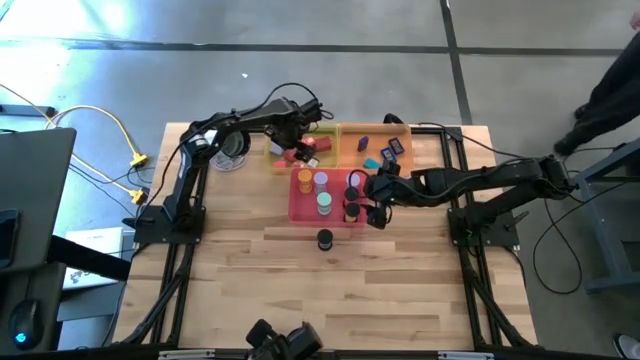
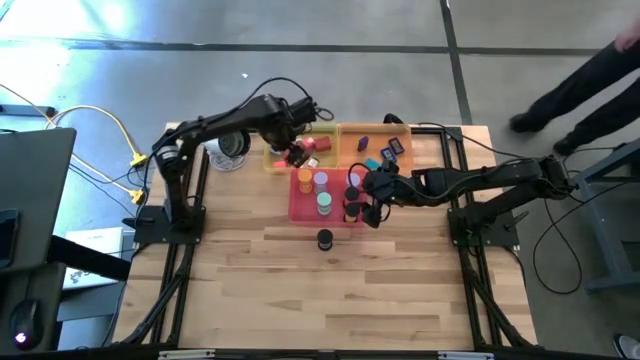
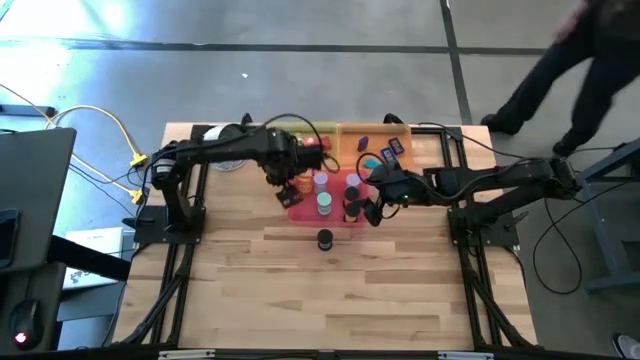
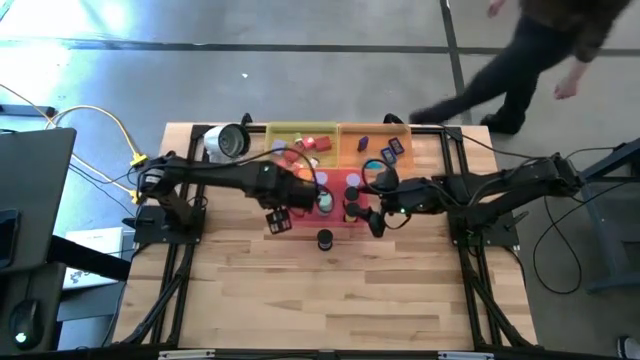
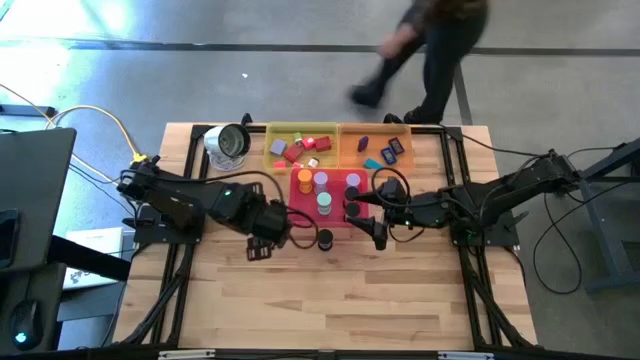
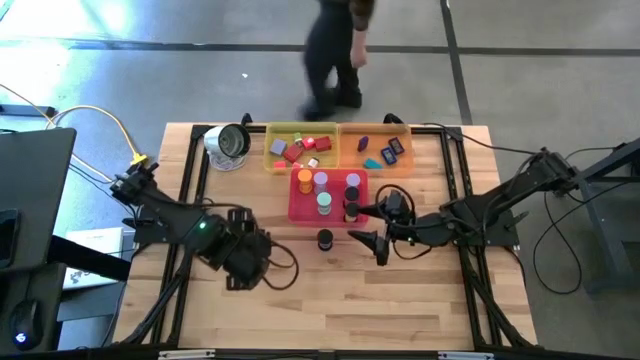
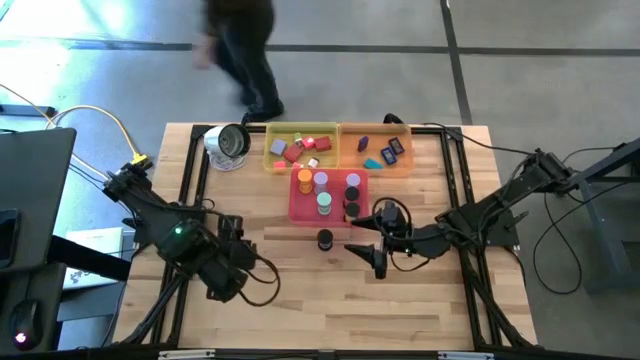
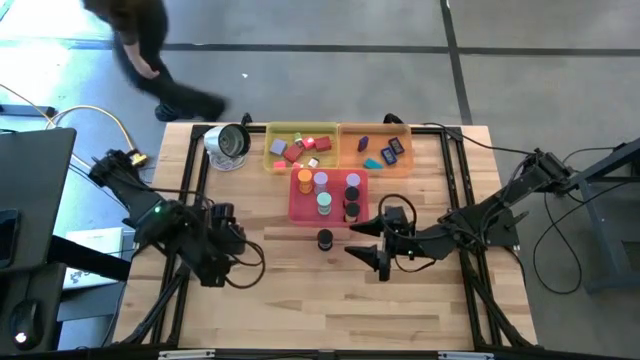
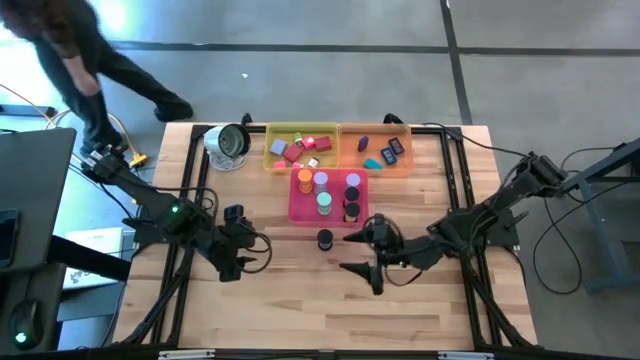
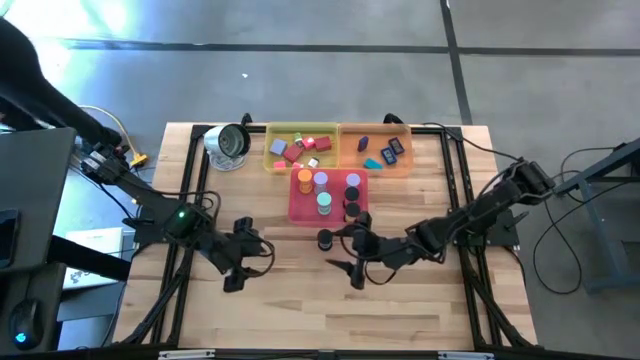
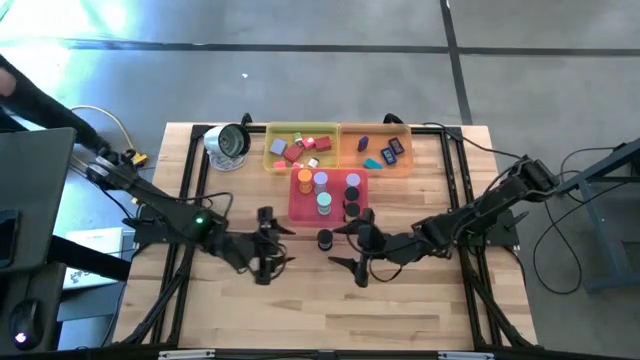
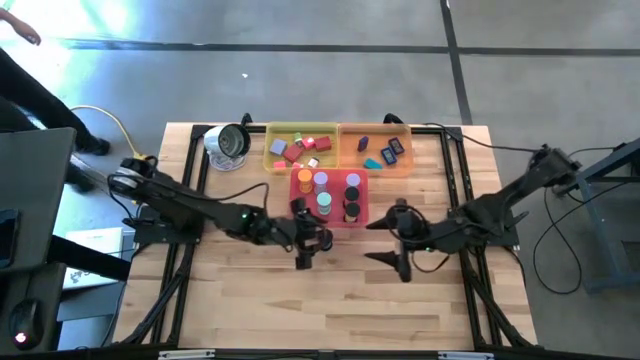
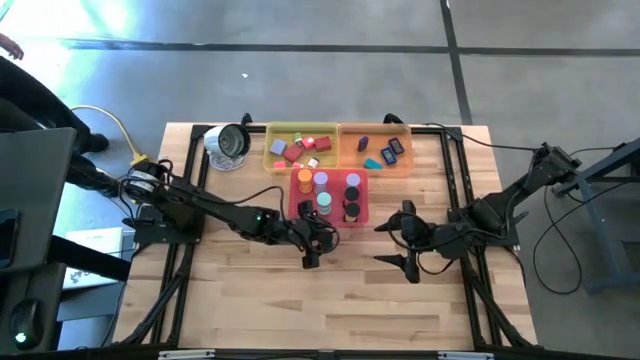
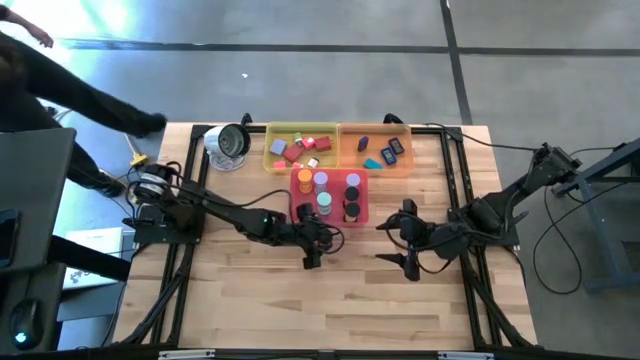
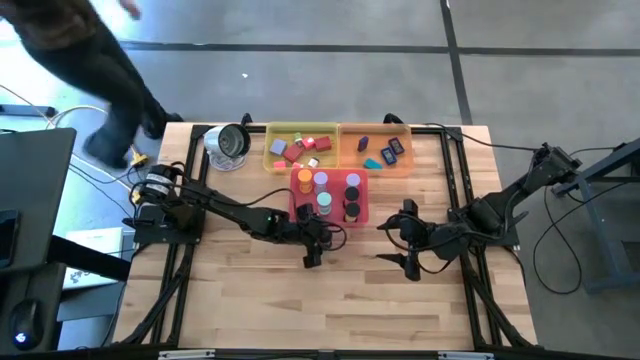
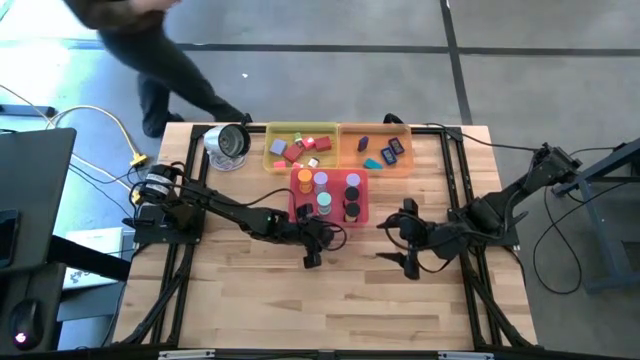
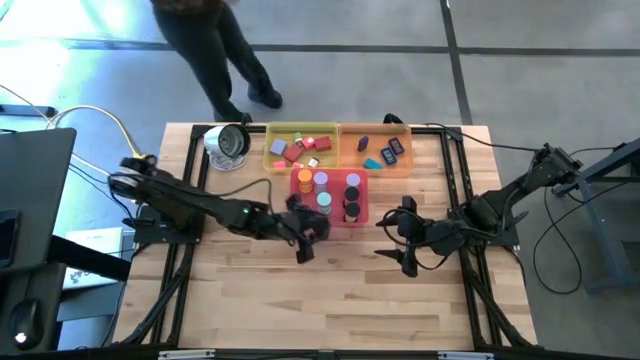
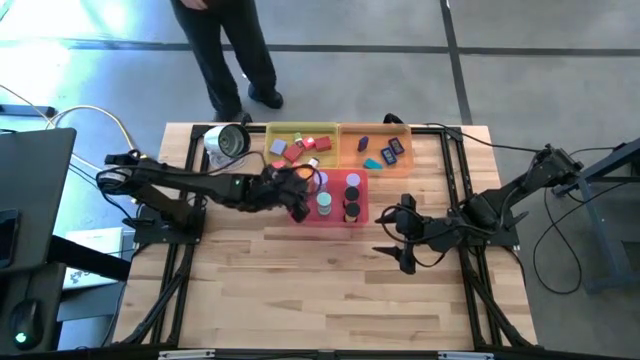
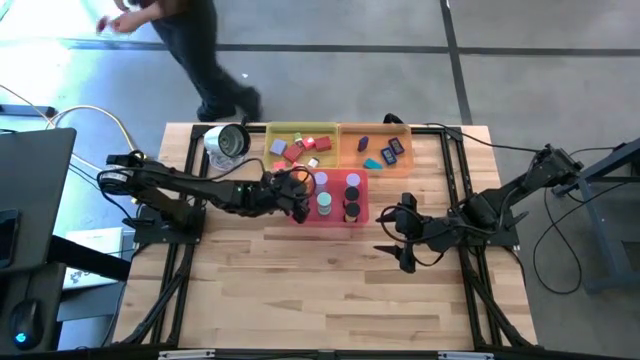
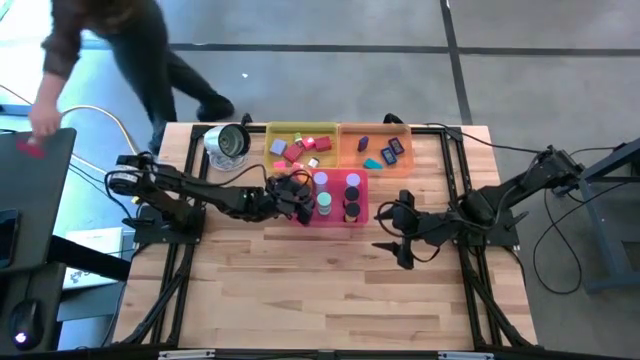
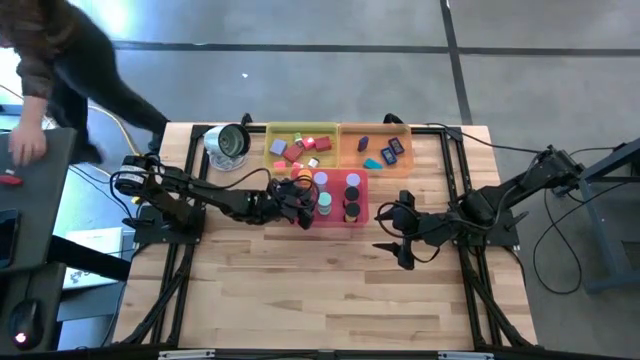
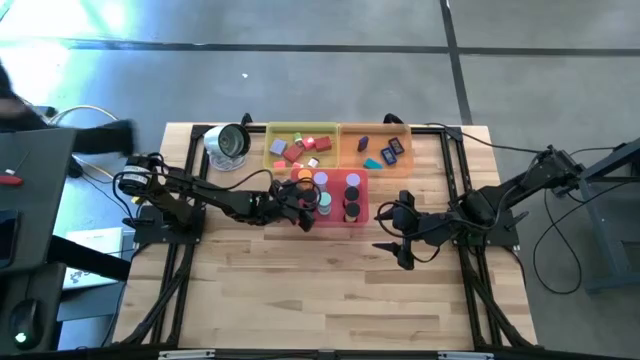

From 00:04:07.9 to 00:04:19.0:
Task: Pick & Place Office items
Put the black hourglass into the red bin

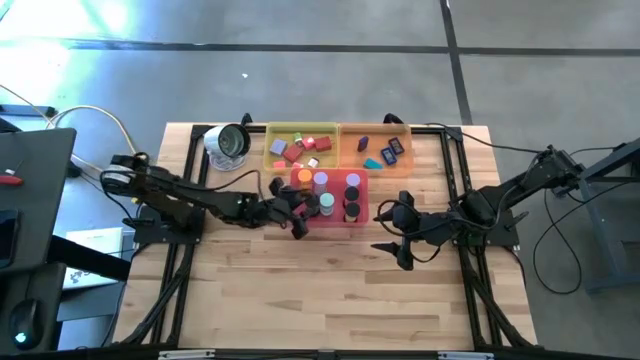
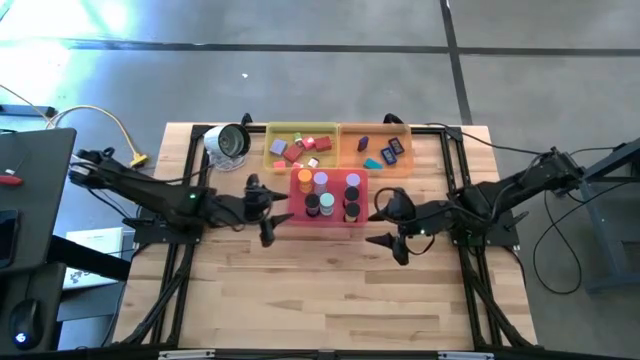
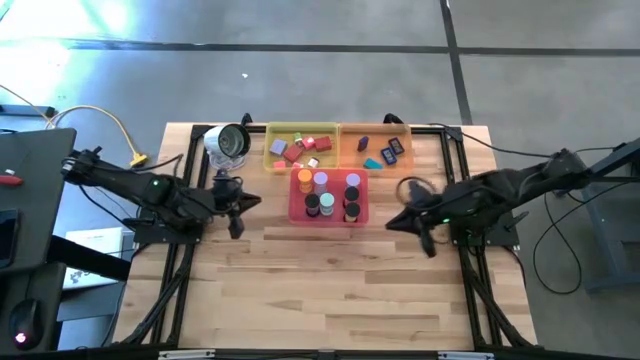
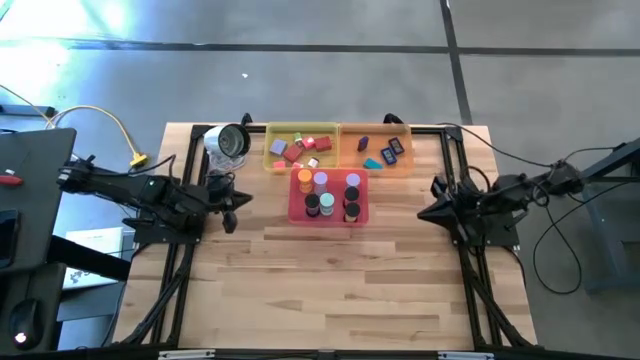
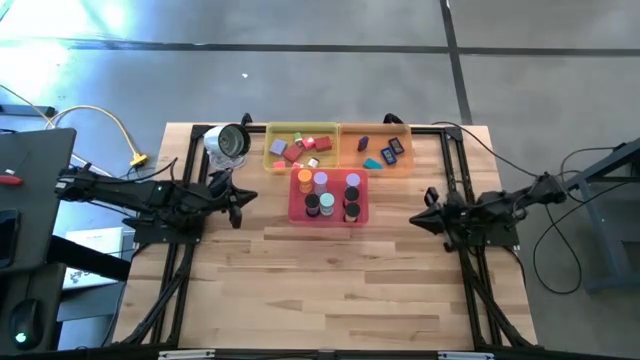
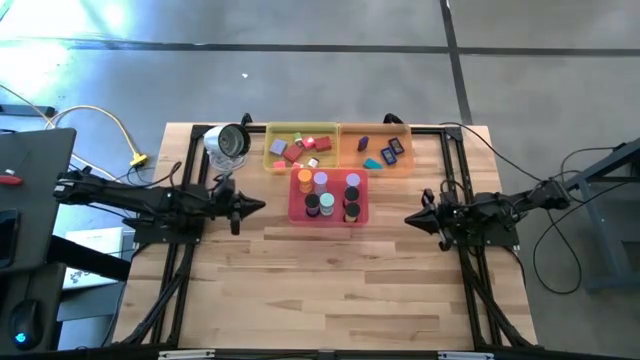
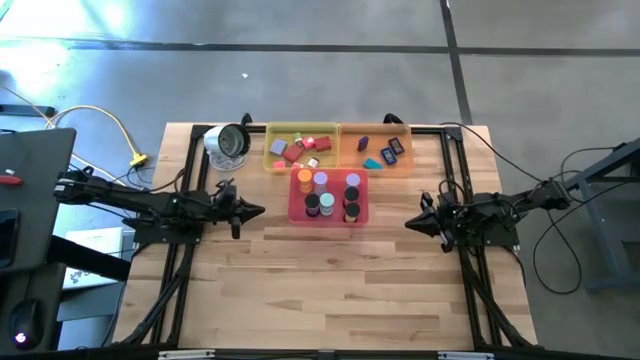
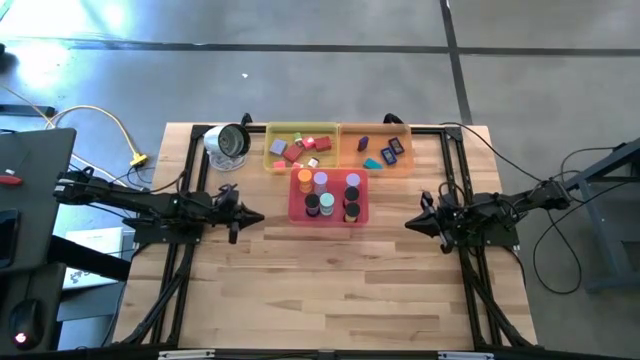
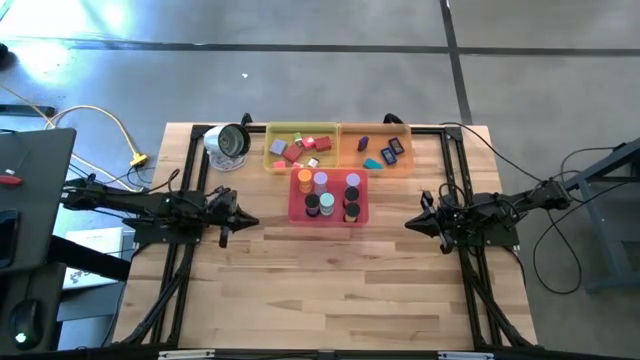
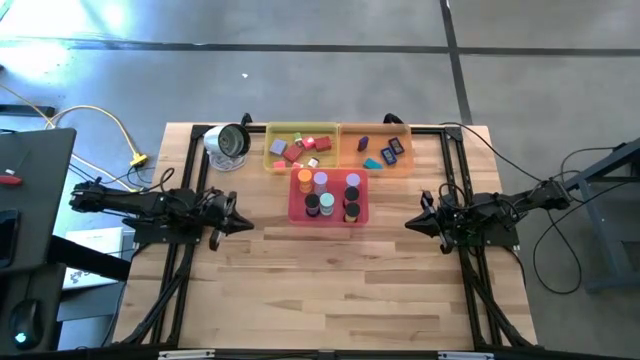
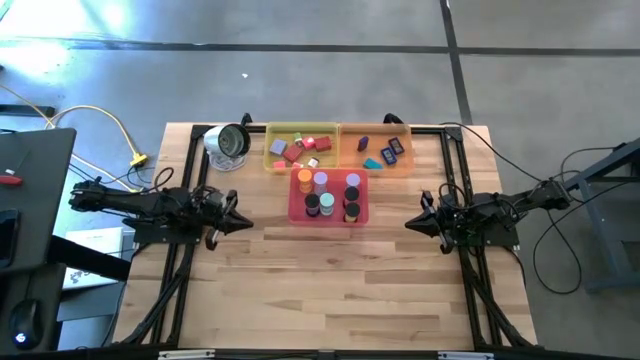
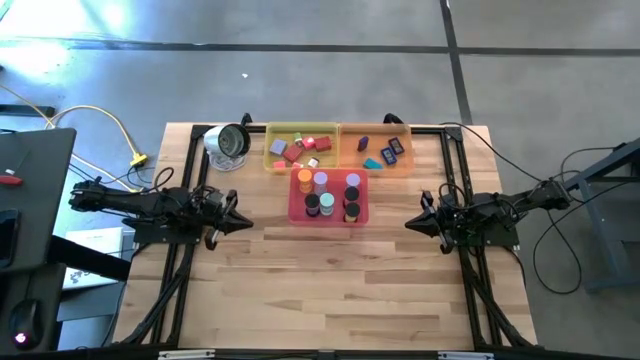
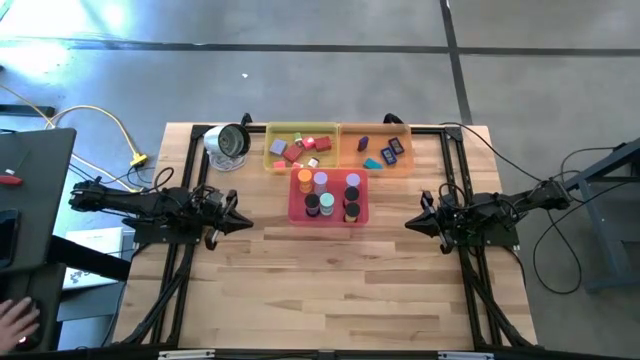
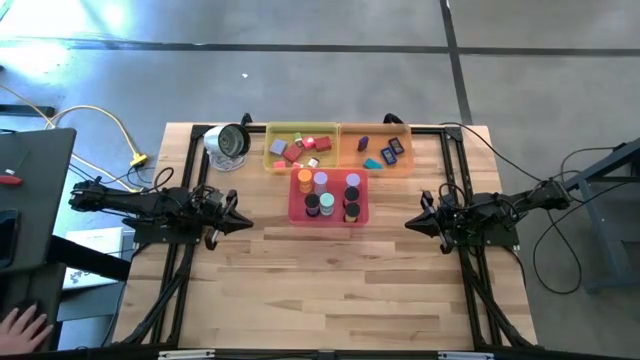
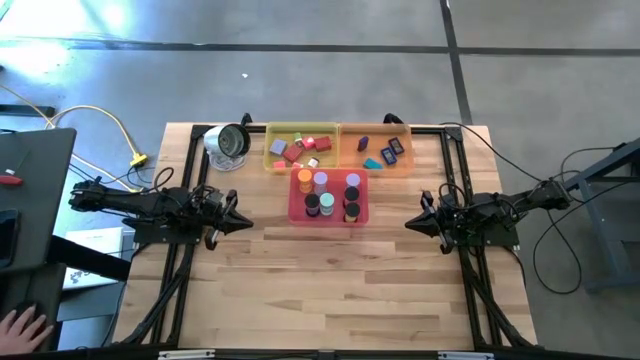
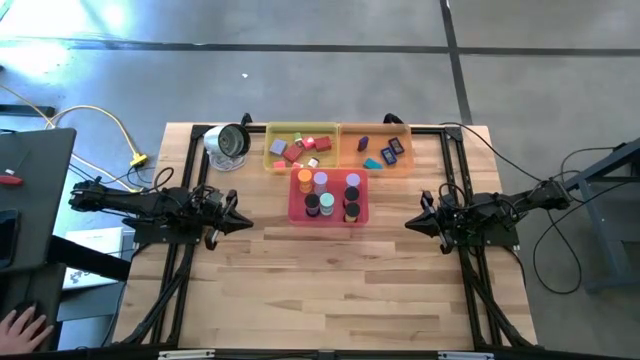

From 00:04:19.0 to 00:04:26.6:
Return to Home Position

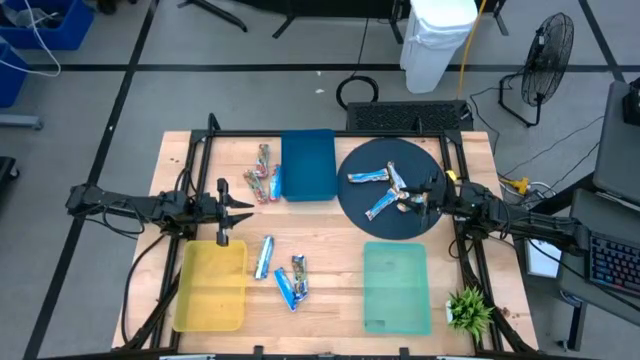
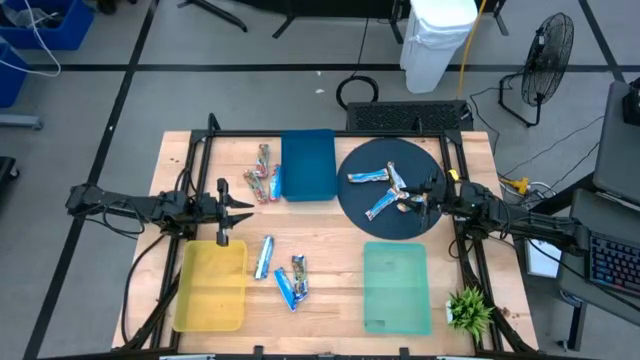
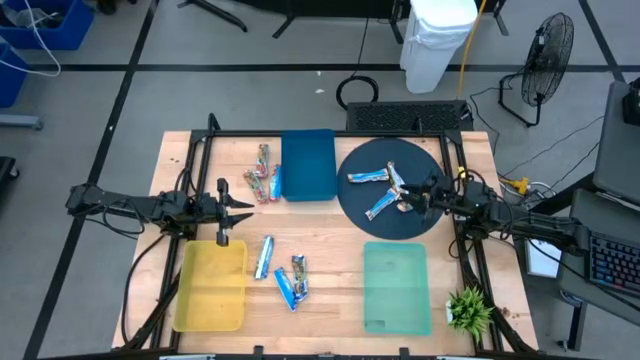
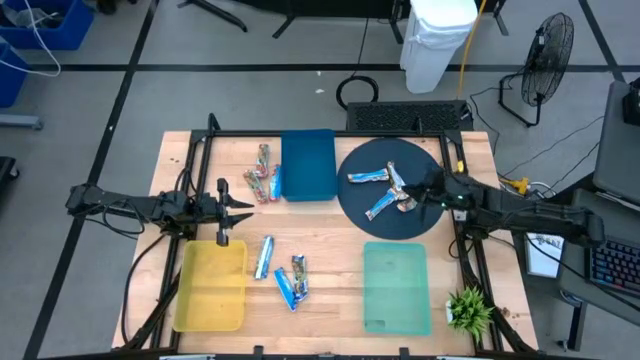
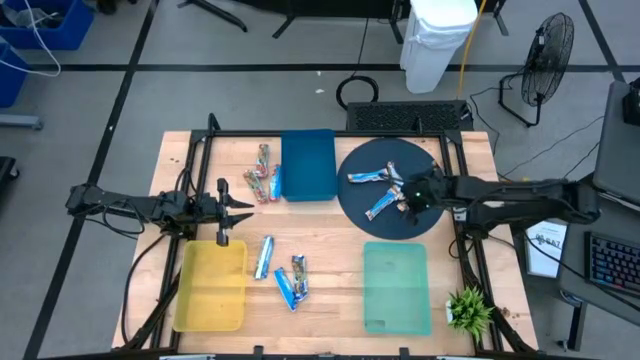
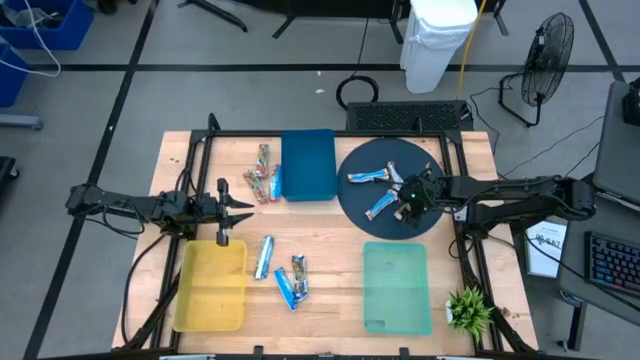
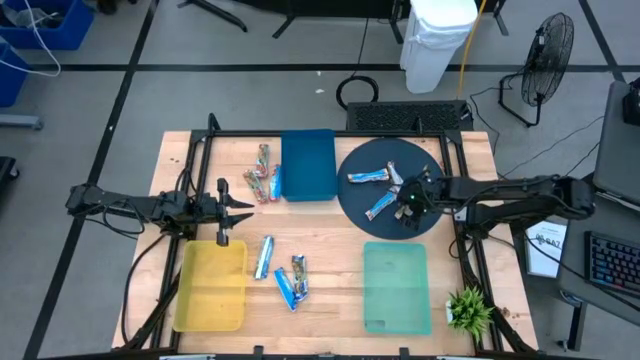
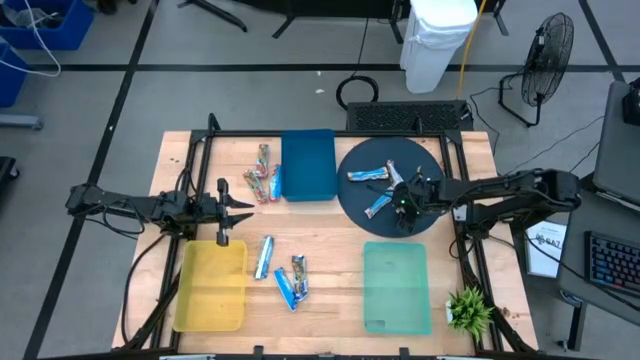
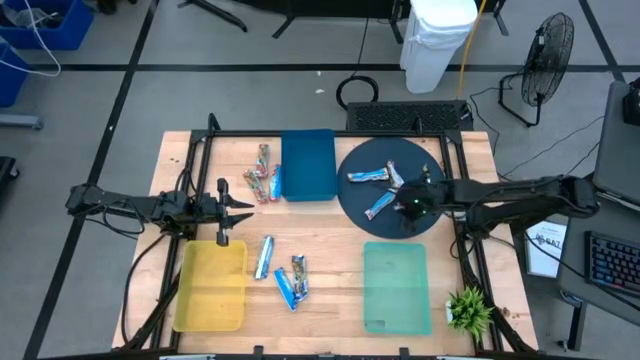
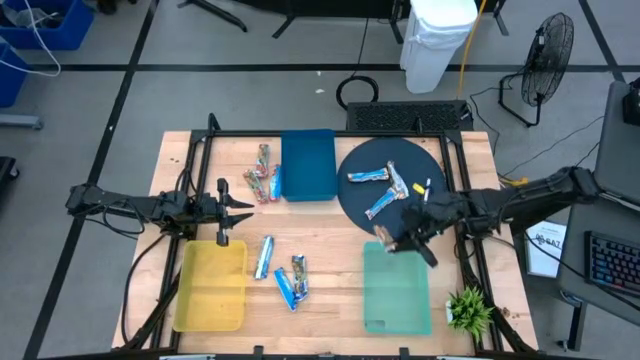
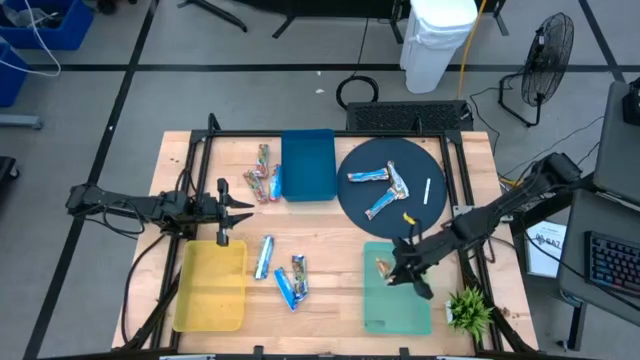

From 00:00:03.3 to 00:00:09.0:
Task: Pick and place Granola Bars by type
Put the yellow granola bar into the green bin
